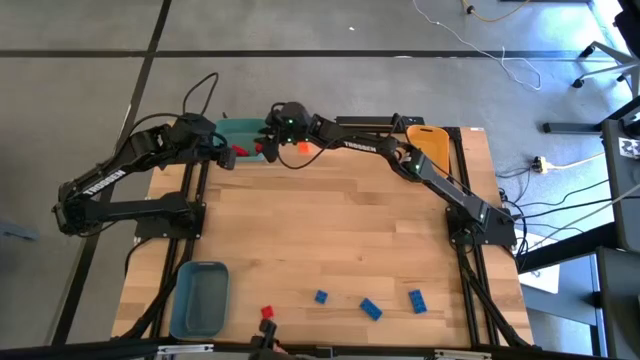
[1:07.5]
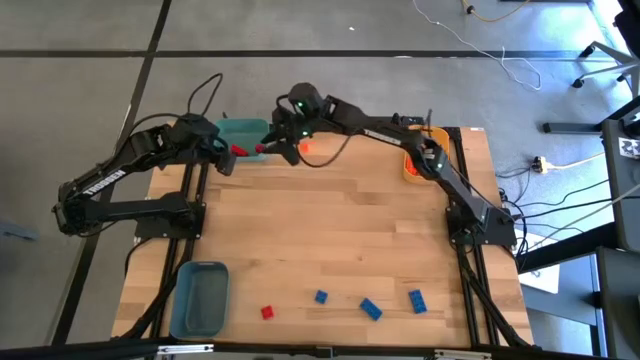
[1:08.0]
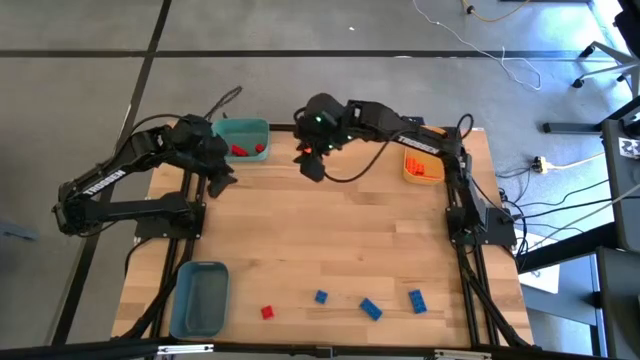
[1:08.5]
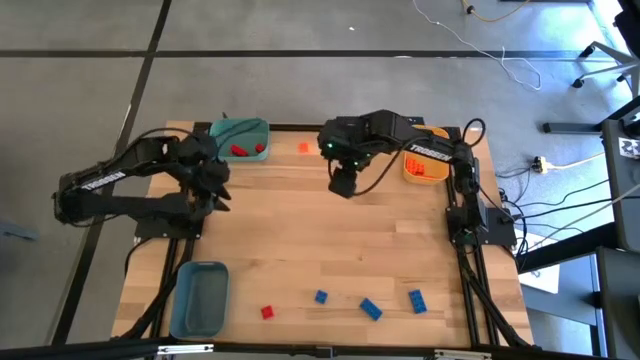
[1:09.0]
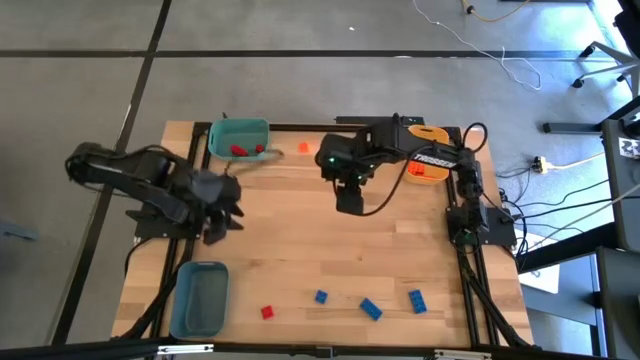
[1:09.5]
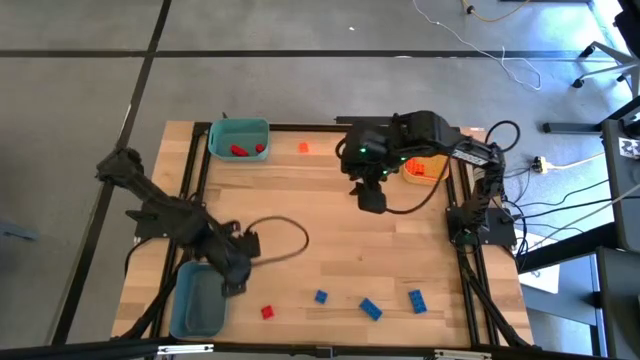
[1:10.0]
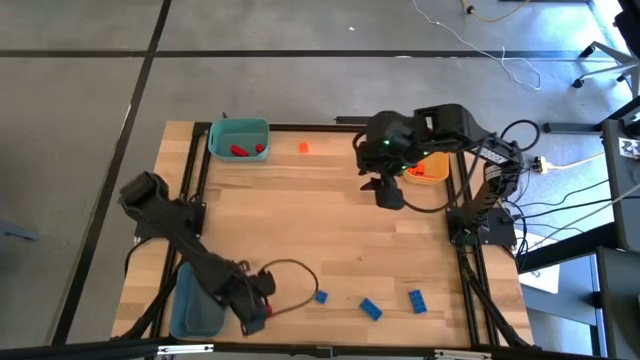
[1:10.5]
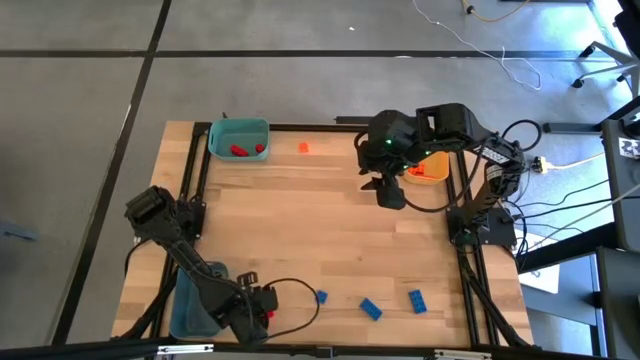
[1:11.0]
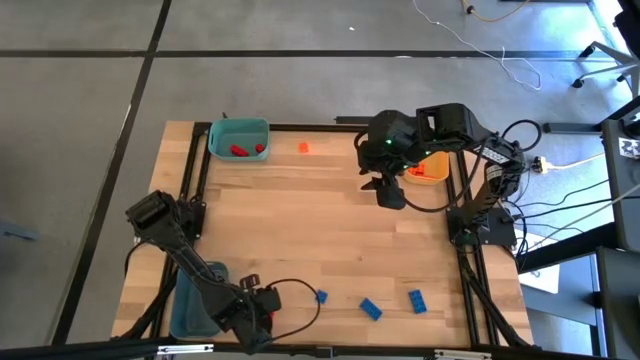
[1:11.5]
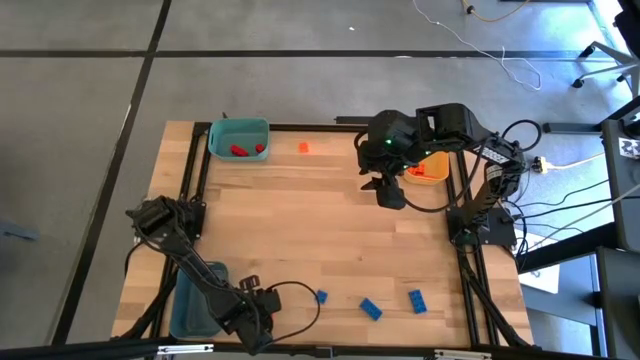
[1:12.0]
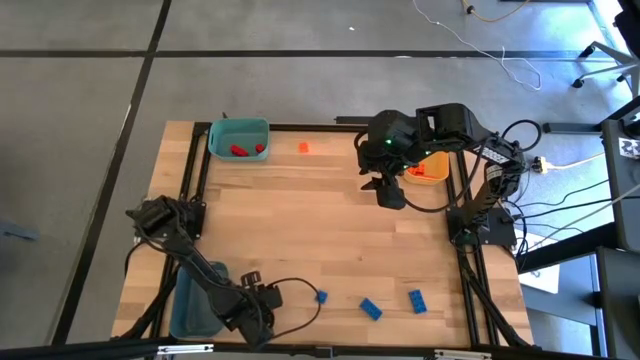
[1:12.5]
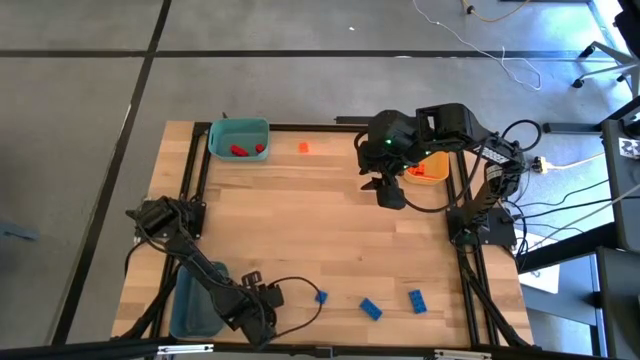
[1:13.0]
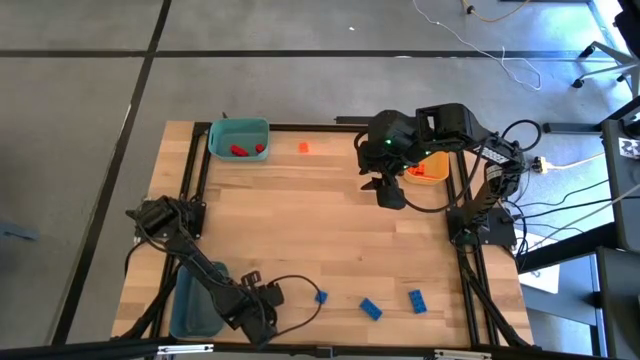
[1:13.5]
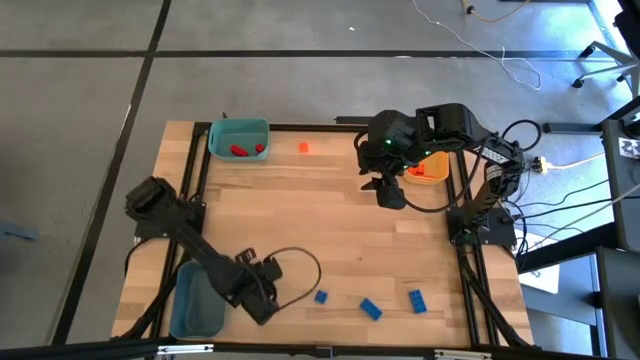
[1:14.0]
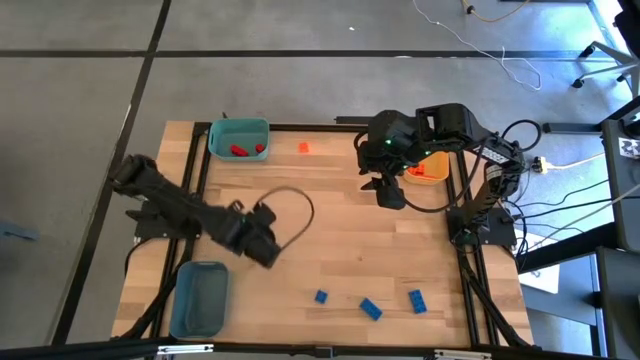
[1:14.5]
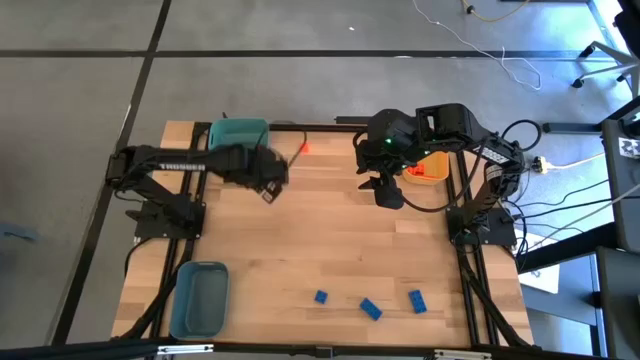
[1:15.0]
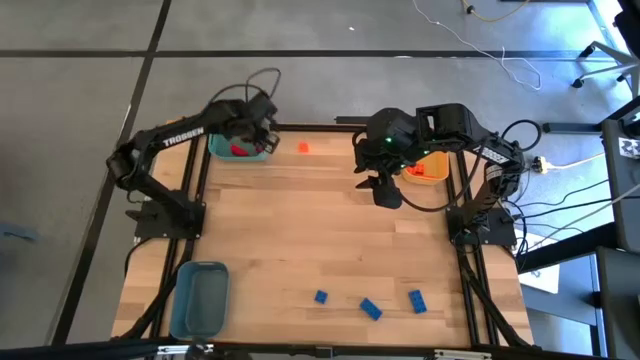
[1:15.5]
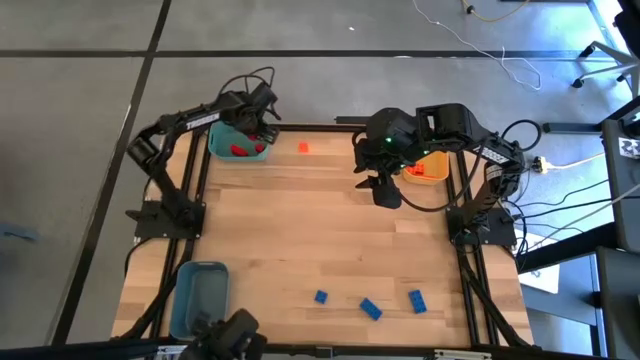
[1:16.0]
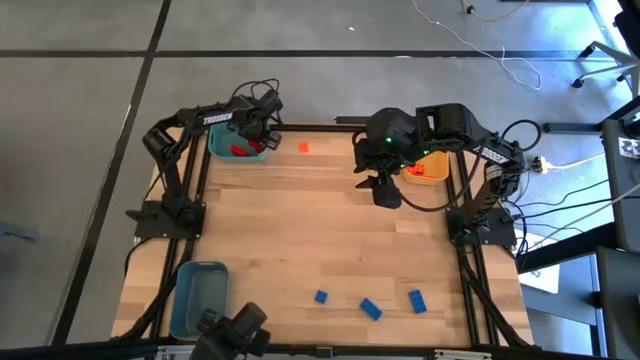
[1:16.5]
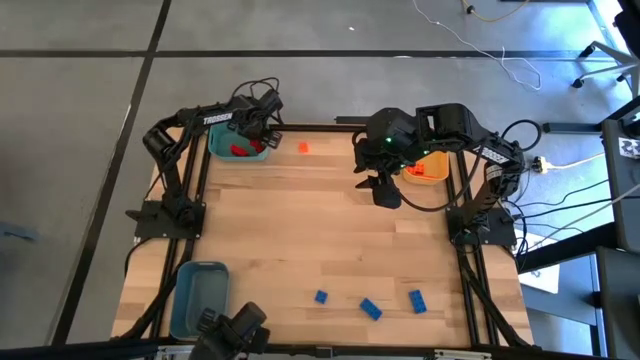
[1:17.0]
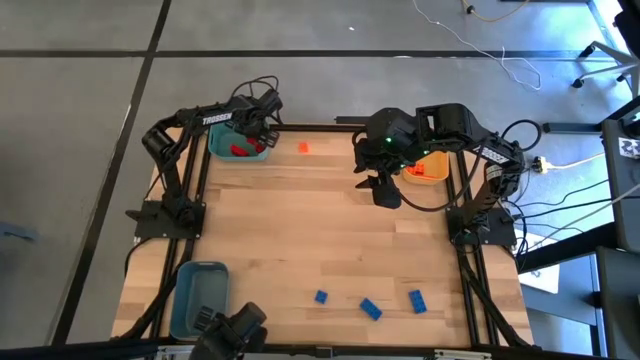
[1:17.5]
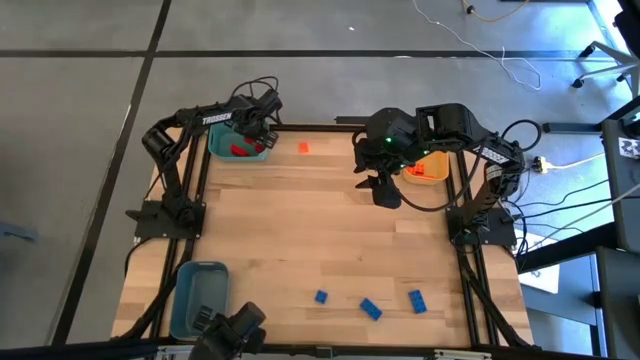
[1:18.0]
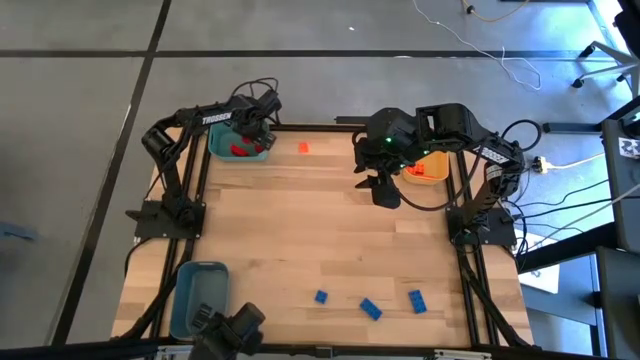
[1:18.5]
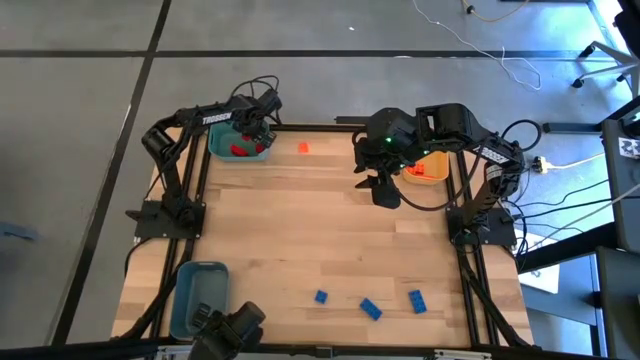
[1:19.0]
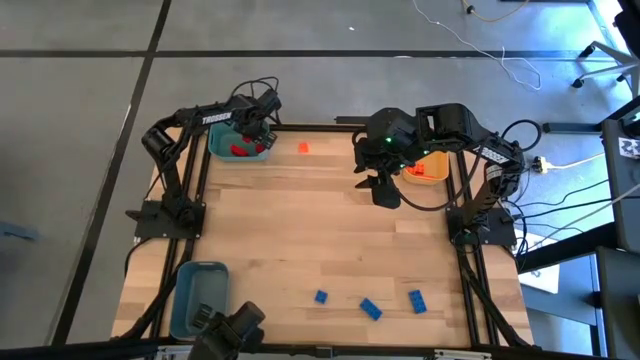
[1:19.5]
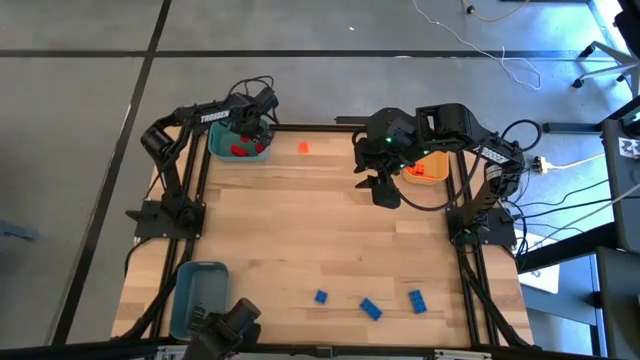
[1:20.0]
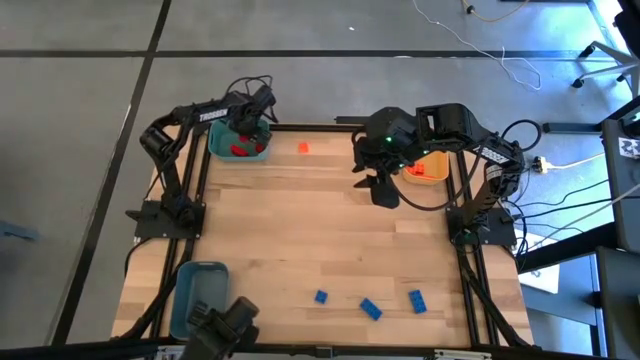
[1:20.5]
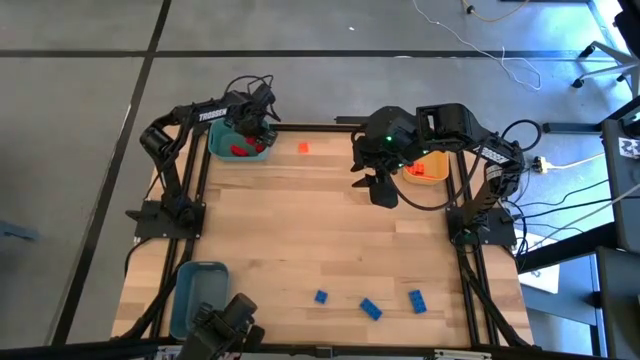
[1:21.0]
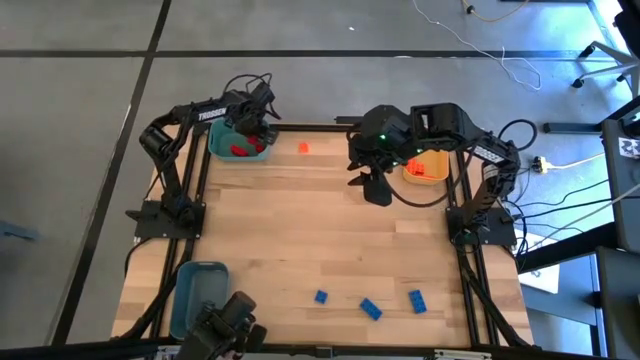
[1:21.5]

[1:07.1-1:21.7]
Task: Sort & place blocks by color
Put the red game piece into the green bin

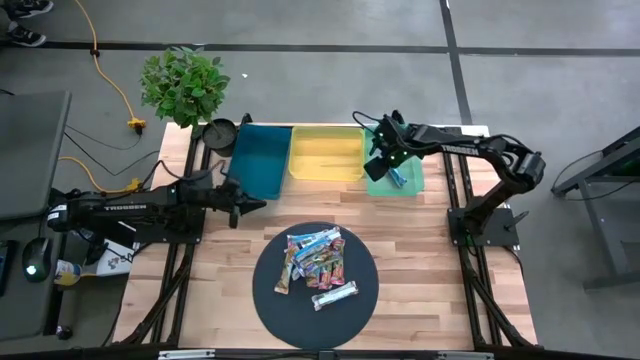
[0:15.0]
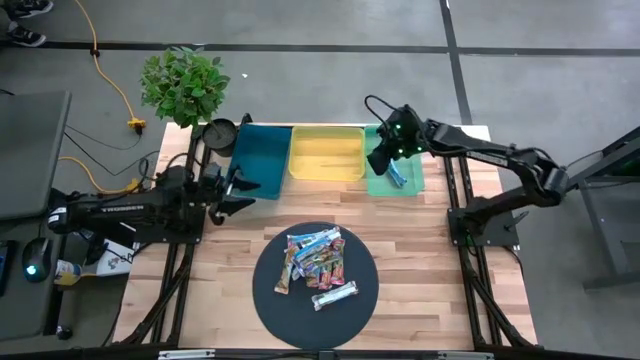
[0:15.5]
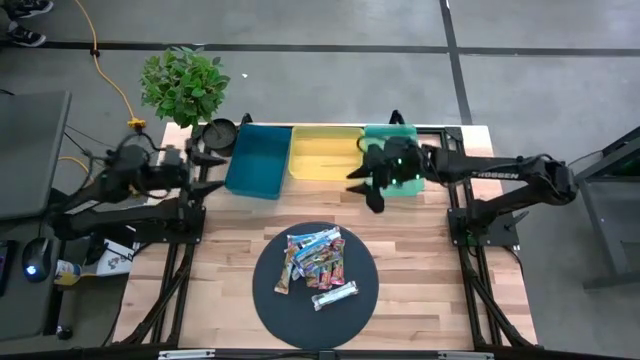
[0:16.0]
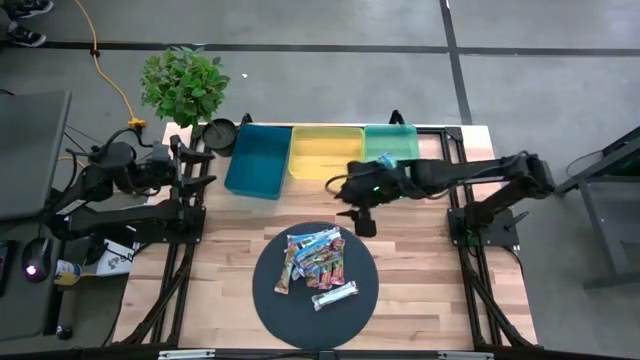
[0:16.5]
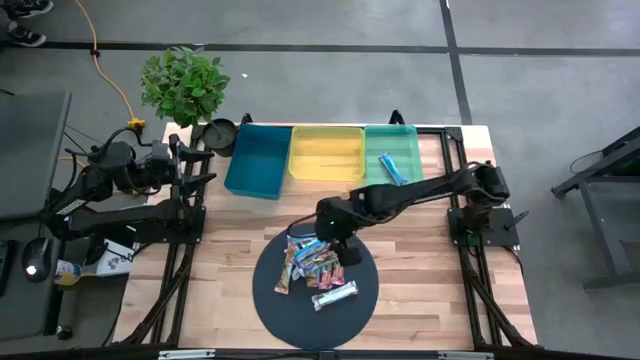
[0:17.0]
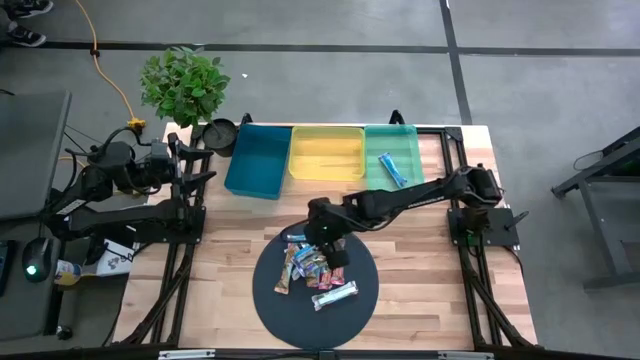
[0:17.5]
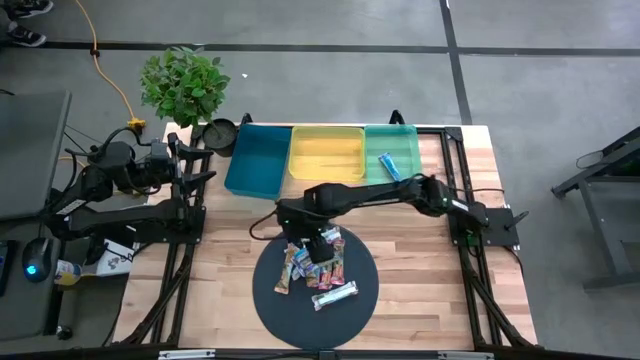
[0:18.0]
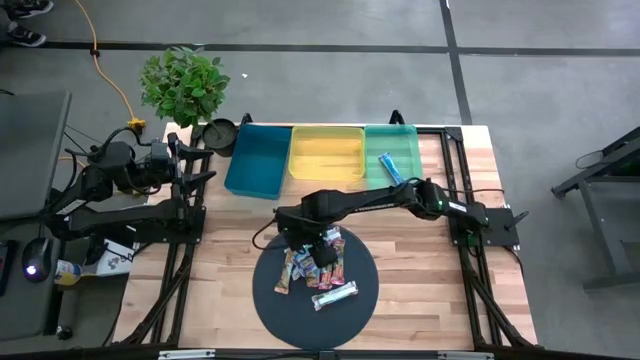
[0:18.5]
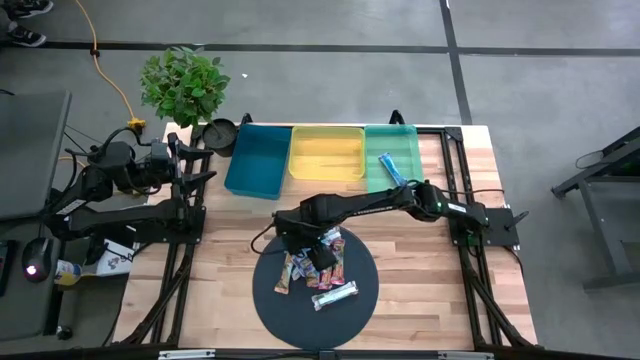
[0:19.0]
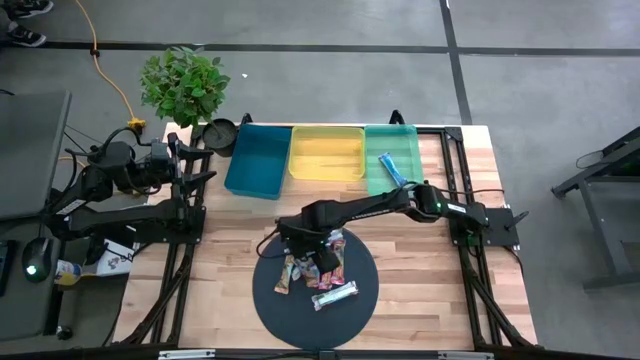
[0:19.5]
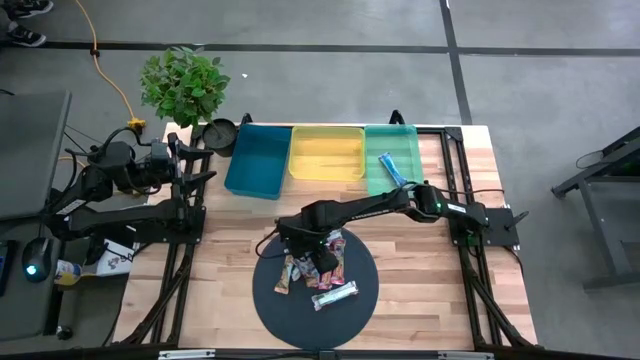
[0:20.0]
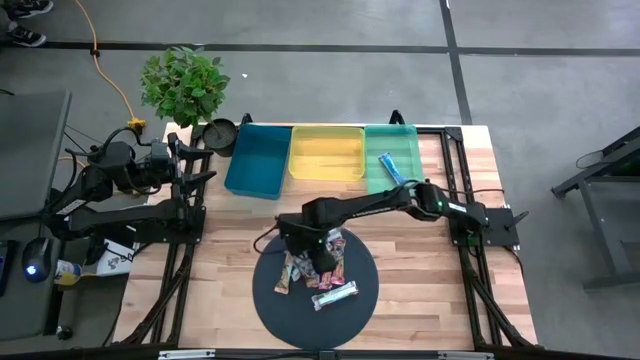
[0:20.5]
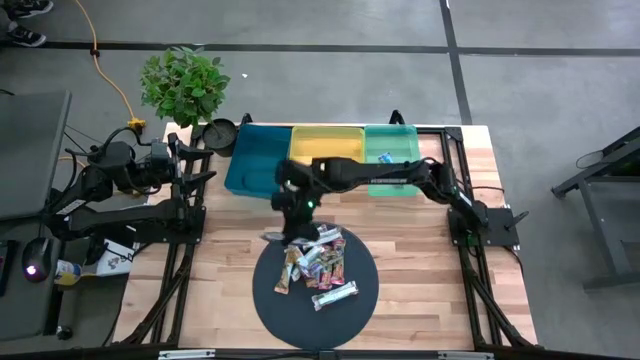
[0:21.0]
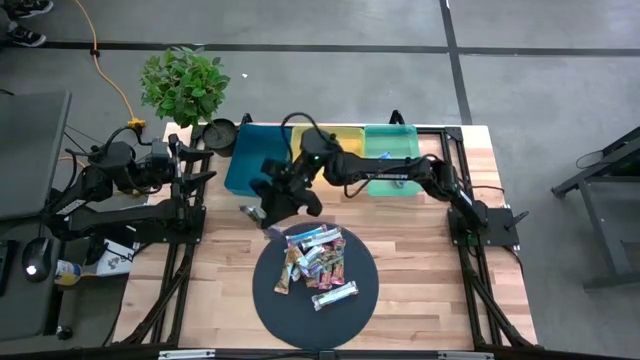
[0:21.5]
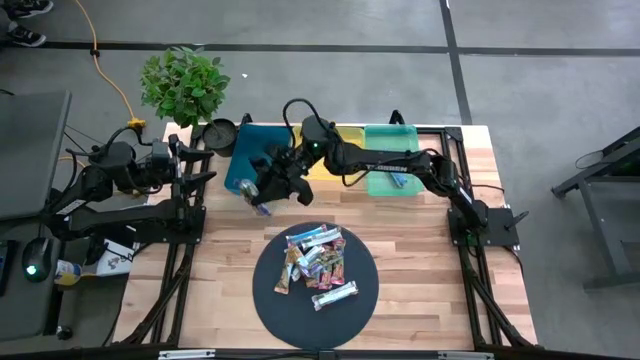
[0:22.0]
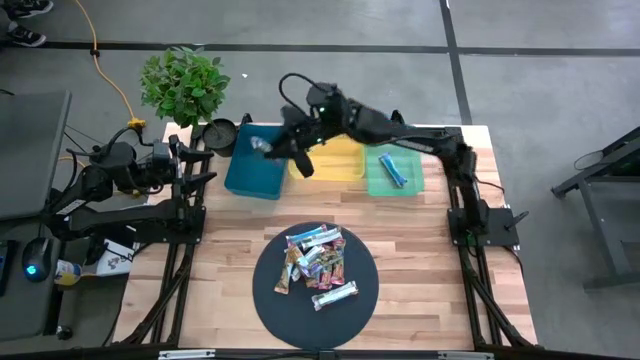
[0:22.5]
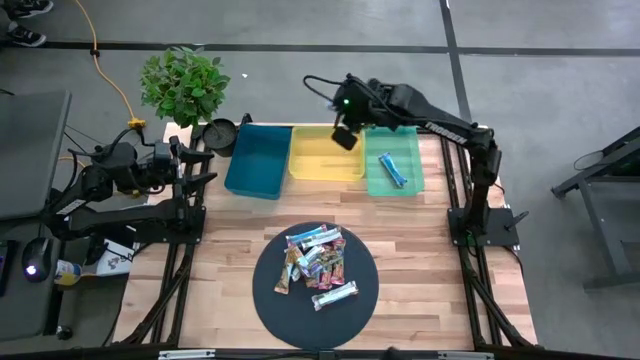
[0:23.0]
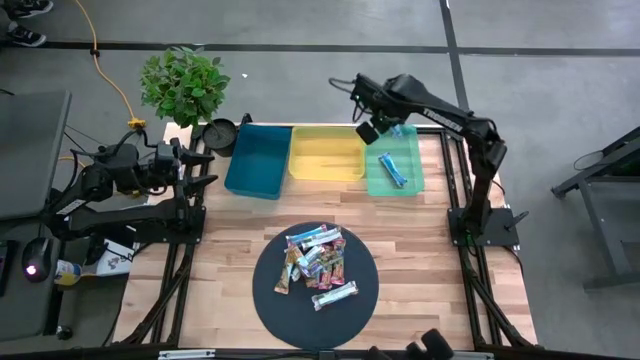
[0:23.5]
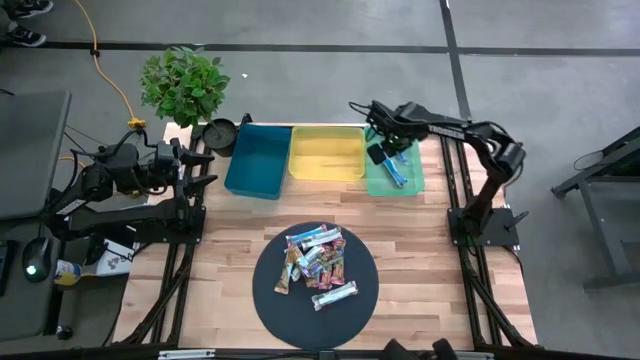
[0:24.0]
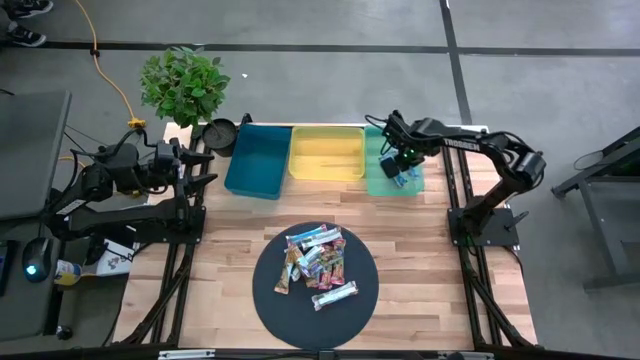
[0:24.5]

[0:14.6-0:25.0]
Task: Pick and place Granola Bars by type
Put the blue granola bar into the green bin
